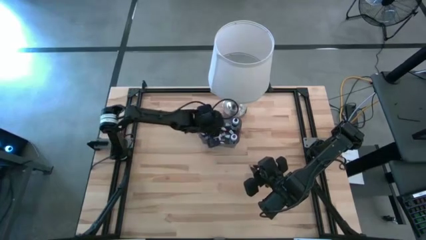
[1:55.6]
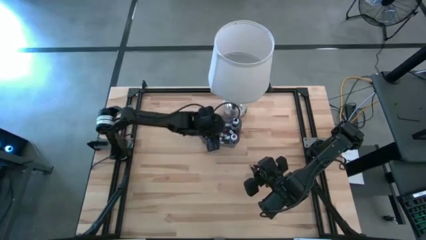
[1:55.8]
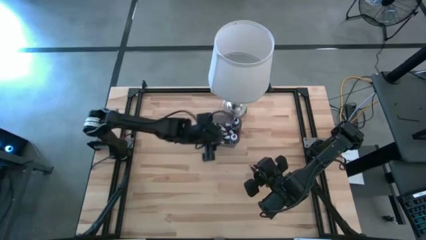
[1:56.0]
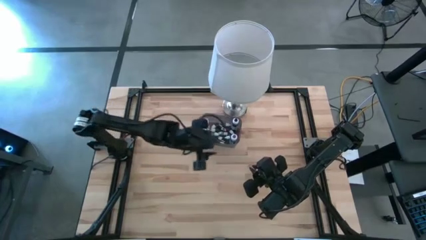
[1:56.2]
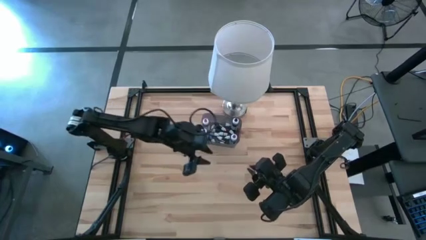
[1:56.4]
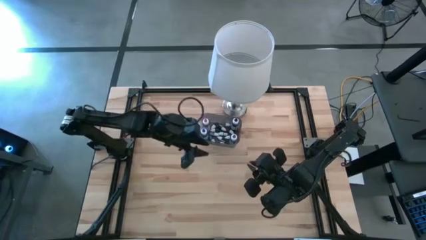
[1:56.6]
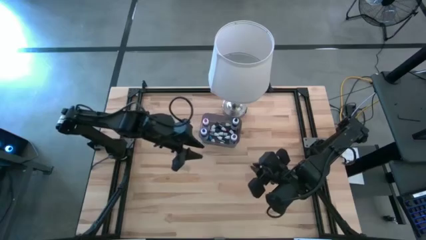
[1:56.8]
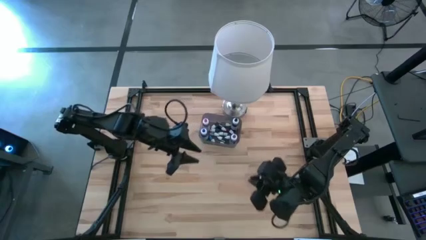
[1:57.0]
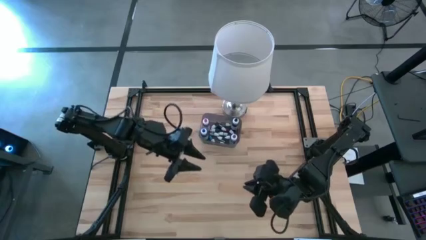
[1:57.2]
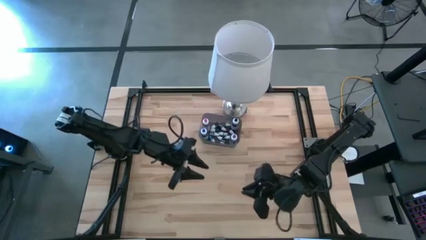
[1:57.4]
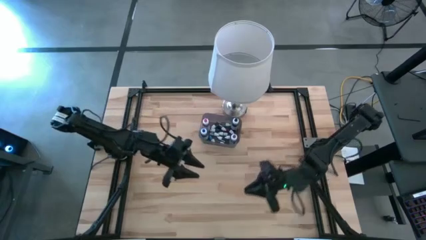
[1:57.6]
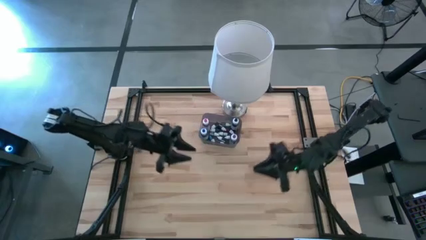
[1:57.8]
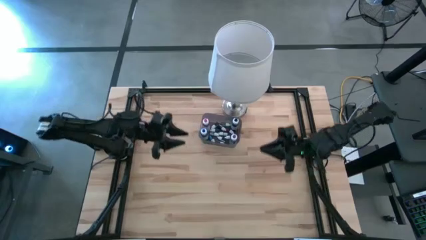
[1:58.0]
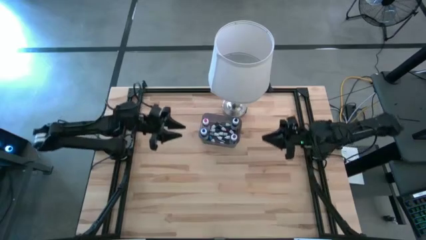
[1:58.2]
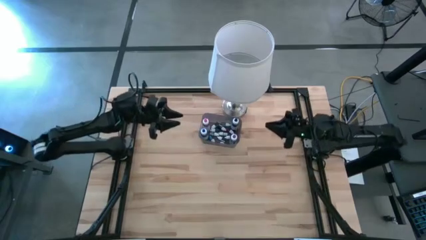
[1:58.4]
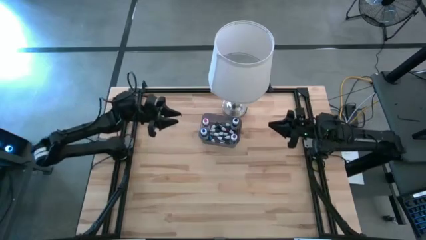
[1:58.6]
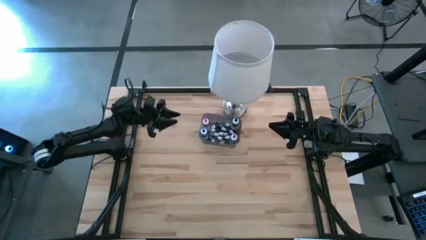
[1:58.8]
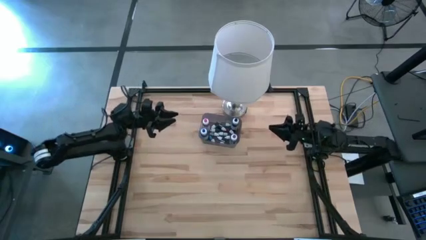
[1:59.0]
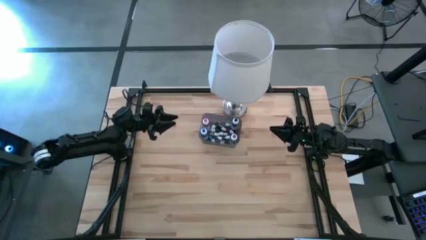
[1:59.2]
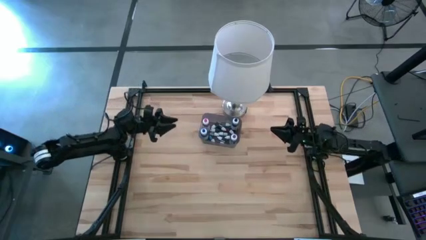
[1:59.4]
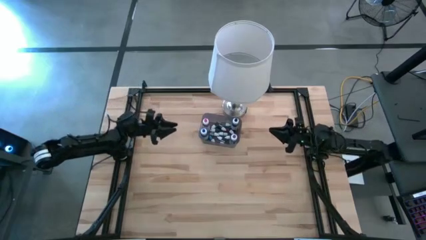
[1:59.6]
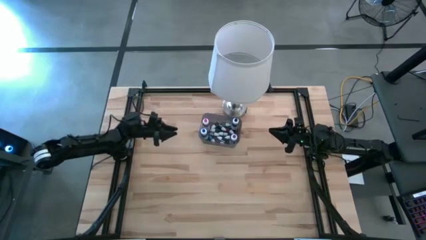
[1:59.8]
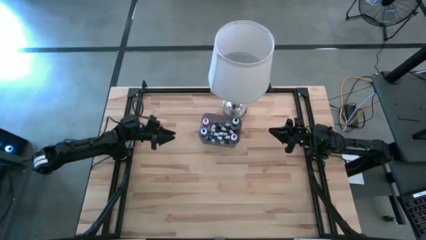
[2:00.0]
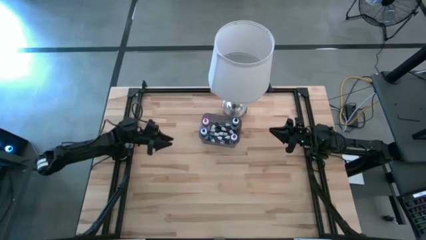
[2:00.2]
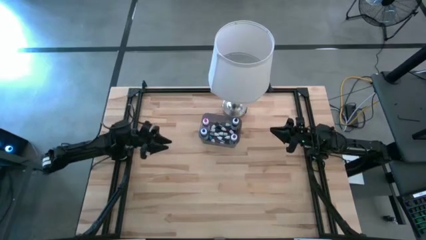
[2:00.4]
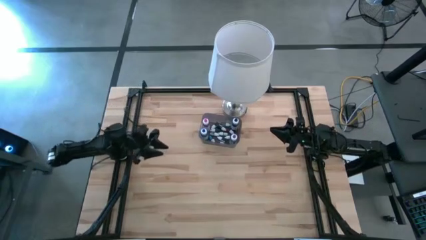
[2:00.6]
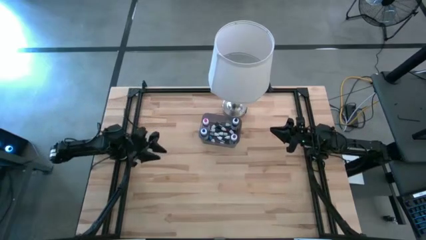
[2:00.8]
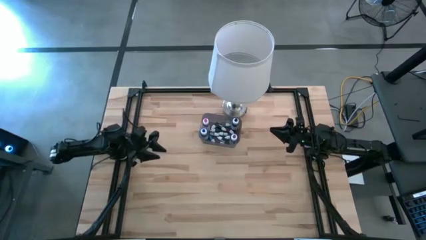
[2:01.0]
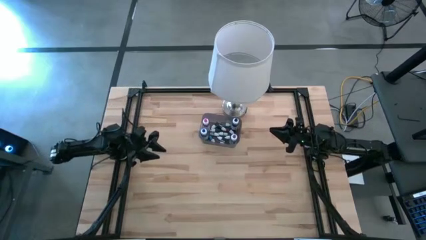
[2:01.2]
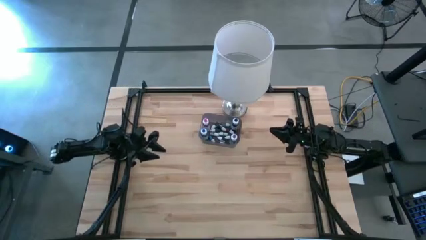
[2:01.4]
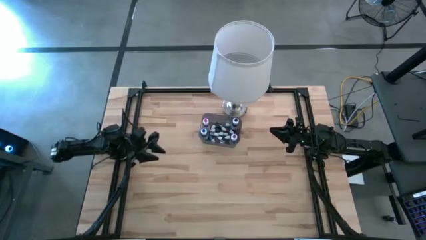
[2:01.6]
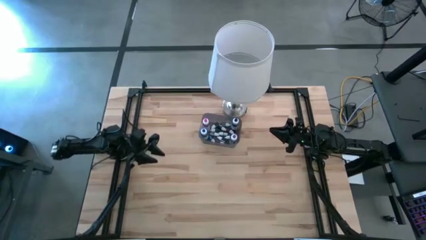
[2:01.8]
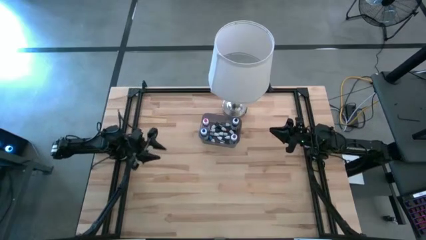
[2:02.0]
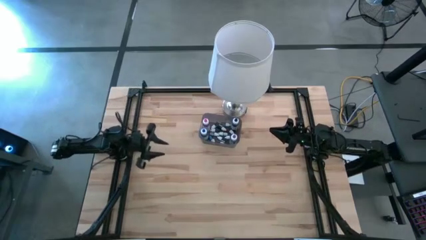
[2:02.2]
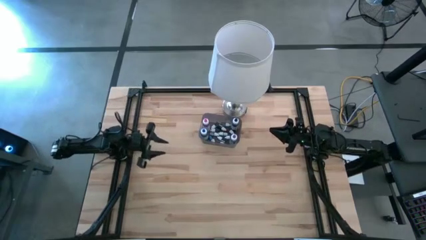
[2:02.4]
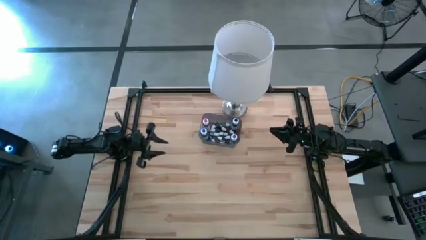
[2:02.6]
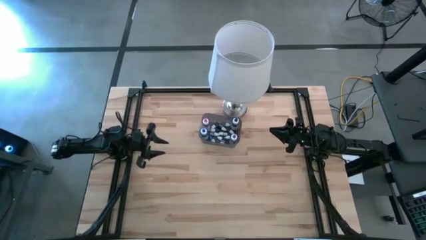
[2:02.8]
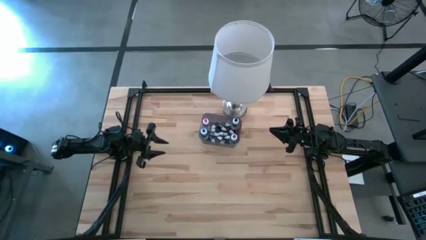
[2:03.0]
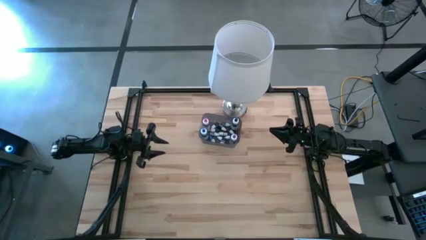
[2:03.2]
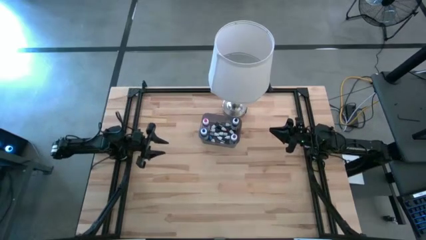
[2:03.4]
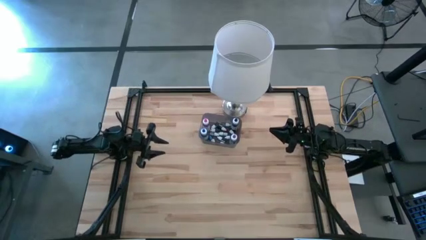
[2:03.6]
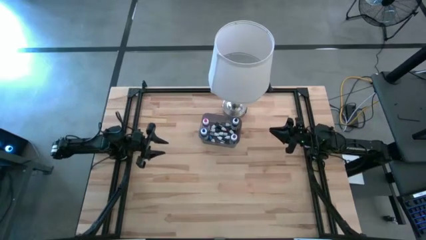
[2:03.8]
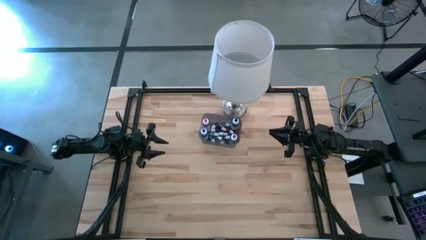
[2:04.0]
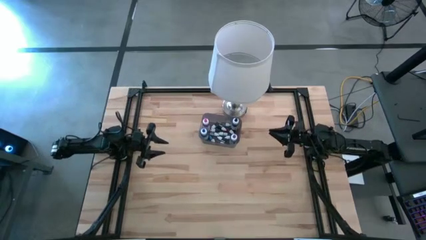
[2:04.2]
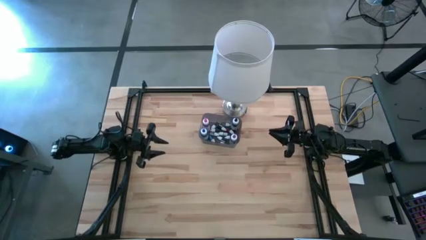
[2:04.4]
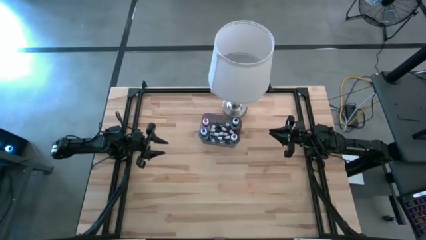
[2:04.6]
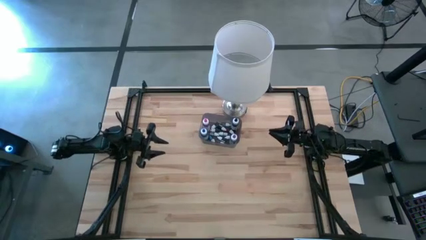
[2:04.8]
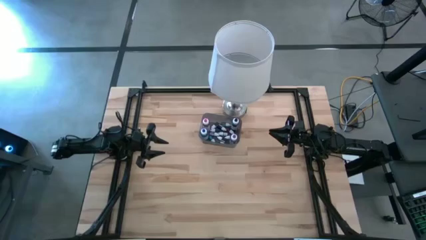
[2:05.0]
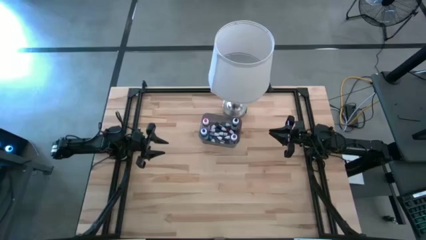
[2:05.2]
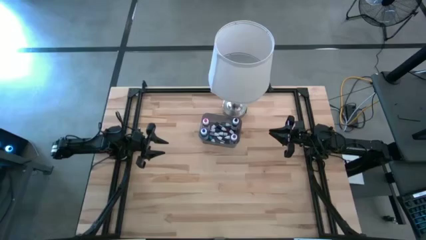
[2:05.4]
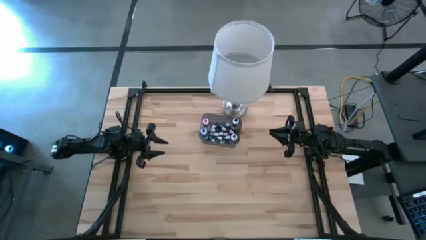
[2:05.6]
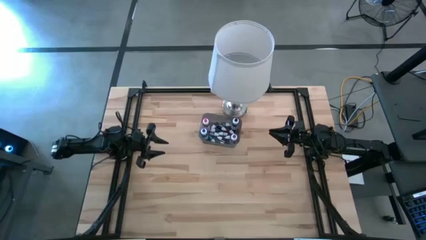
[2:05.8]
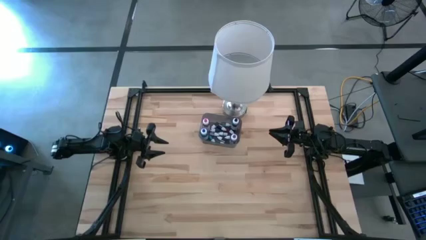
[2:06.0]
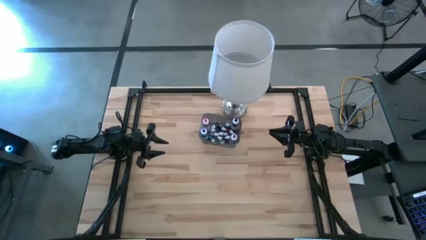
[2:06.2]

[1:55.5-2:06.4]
Task: Pick & Place food coloring
Return to Home Position
